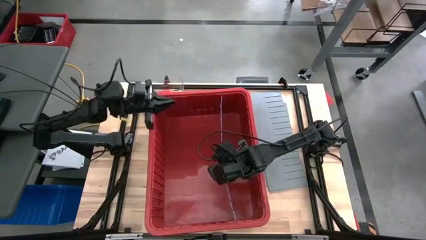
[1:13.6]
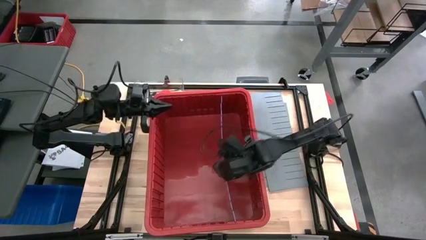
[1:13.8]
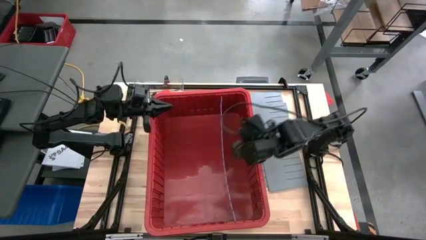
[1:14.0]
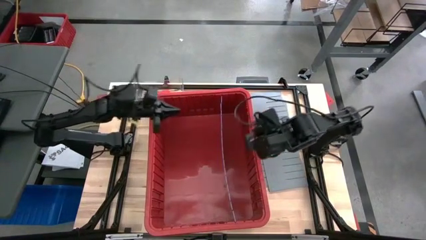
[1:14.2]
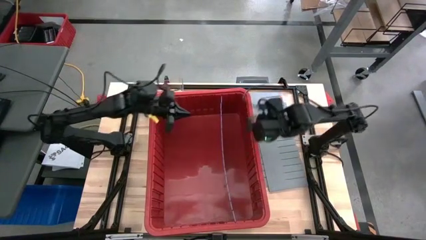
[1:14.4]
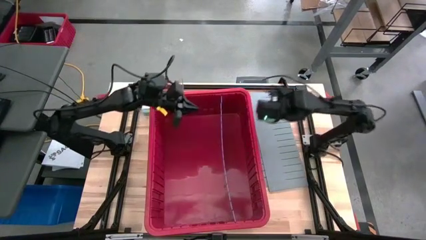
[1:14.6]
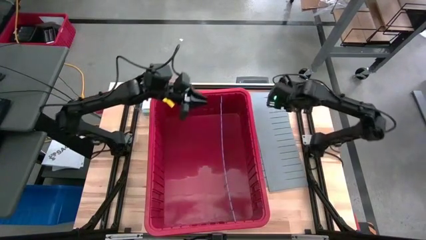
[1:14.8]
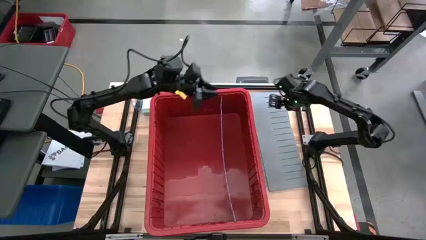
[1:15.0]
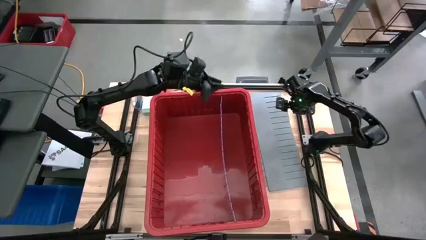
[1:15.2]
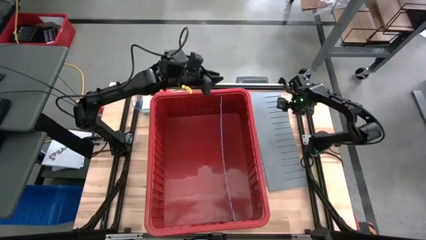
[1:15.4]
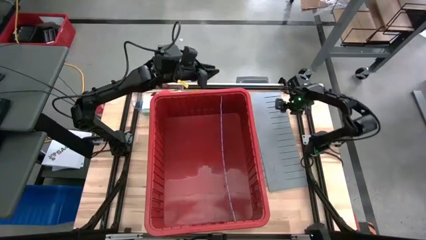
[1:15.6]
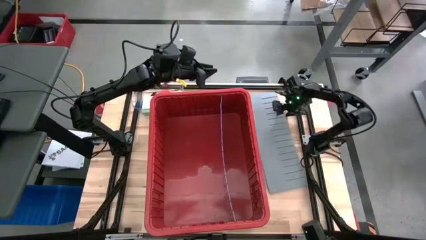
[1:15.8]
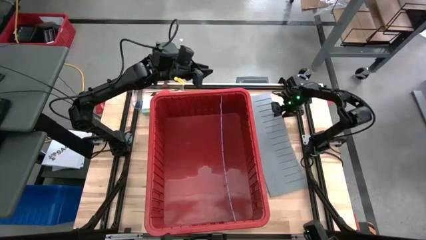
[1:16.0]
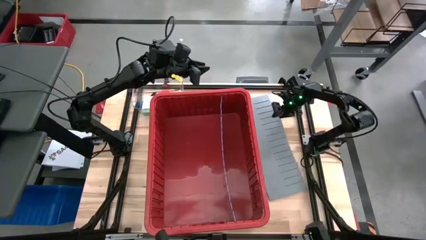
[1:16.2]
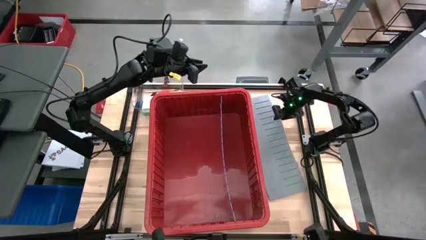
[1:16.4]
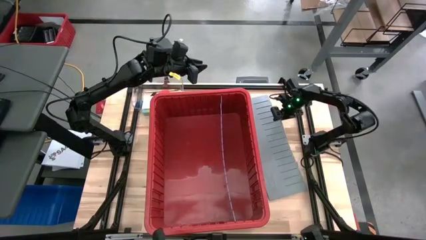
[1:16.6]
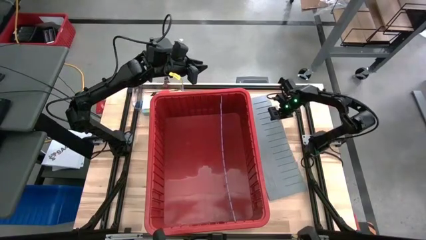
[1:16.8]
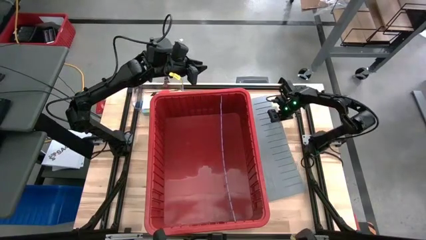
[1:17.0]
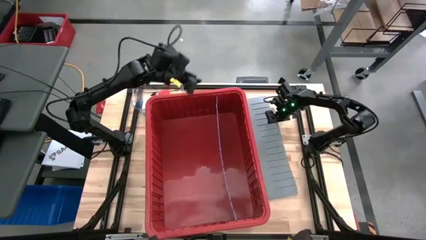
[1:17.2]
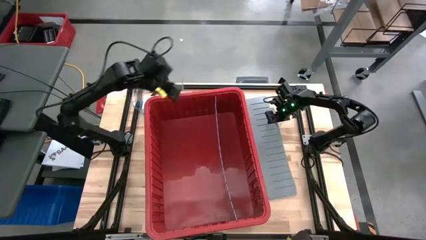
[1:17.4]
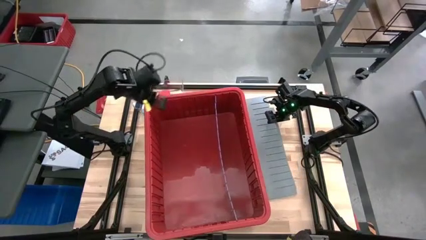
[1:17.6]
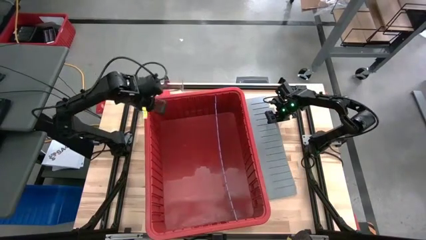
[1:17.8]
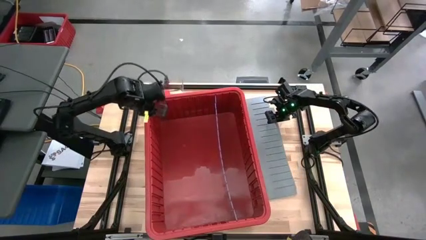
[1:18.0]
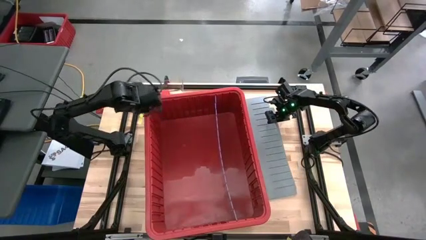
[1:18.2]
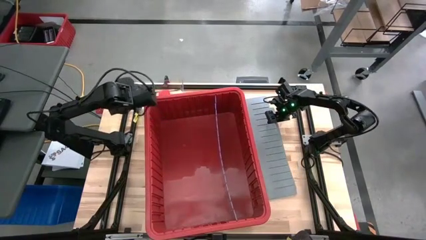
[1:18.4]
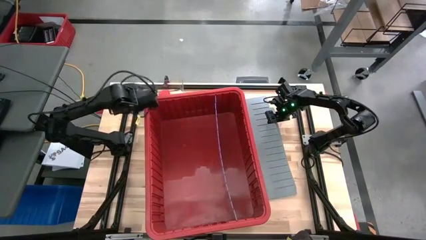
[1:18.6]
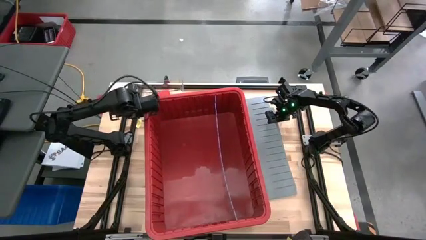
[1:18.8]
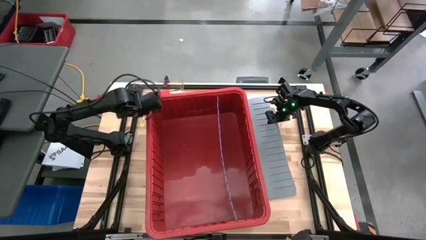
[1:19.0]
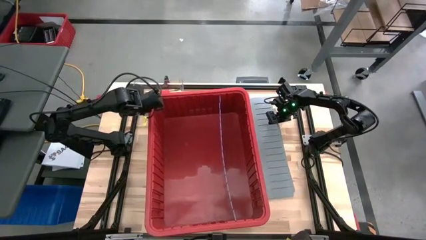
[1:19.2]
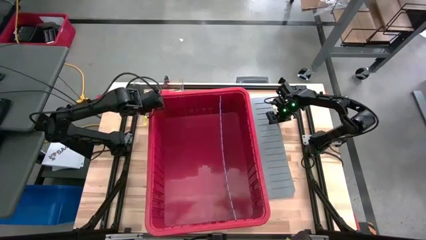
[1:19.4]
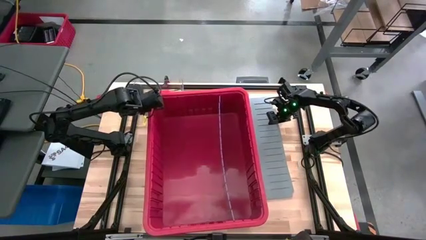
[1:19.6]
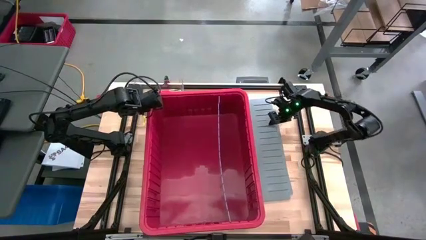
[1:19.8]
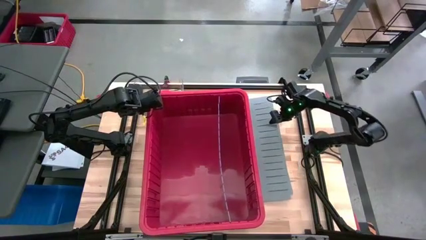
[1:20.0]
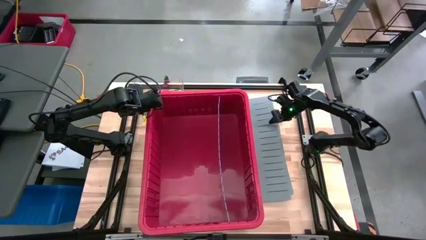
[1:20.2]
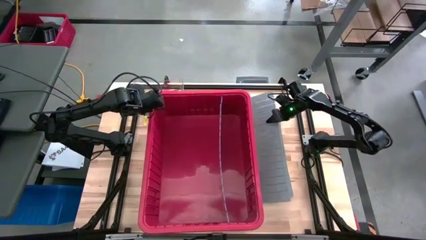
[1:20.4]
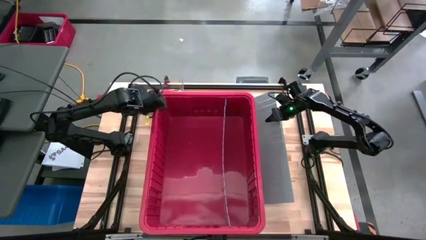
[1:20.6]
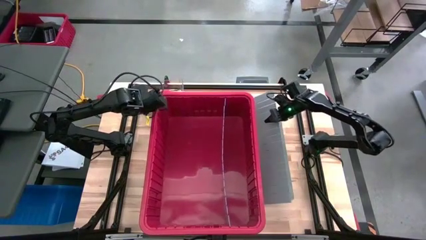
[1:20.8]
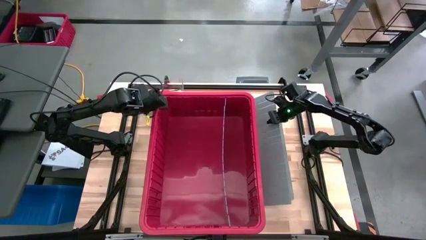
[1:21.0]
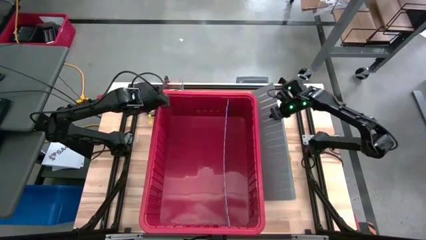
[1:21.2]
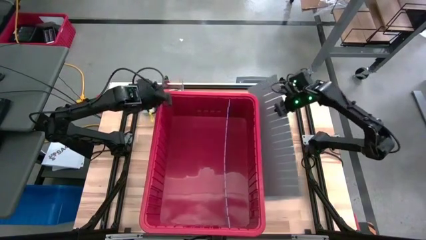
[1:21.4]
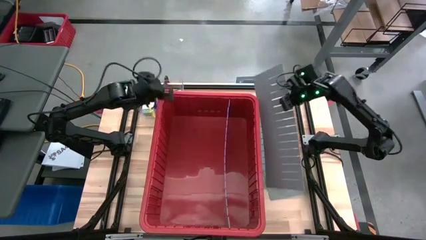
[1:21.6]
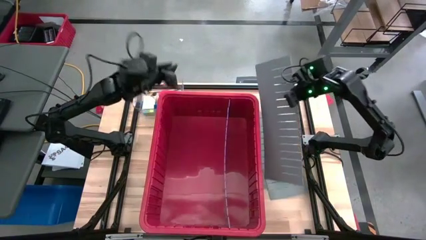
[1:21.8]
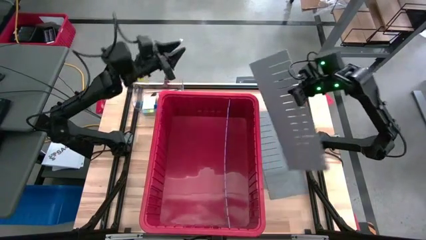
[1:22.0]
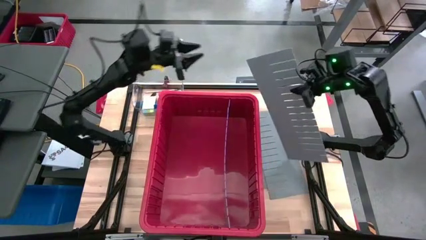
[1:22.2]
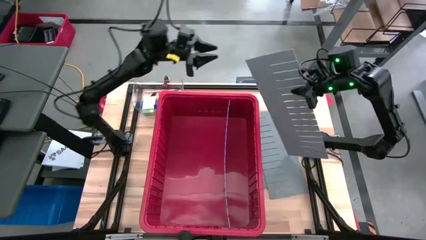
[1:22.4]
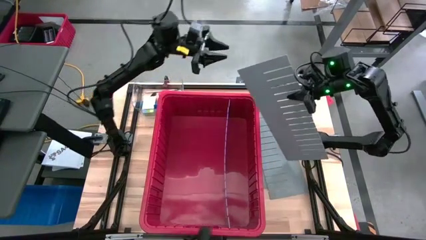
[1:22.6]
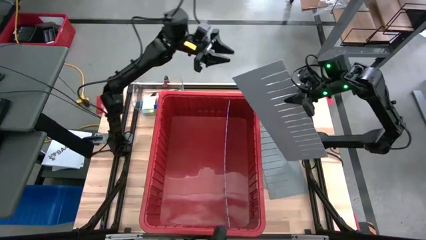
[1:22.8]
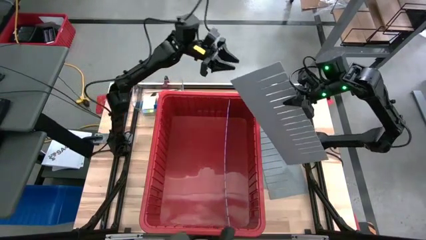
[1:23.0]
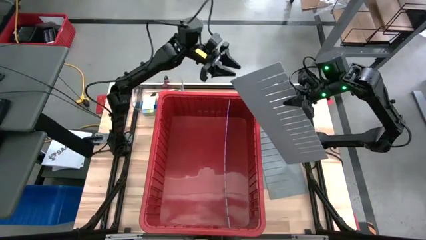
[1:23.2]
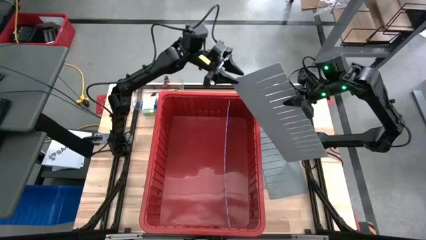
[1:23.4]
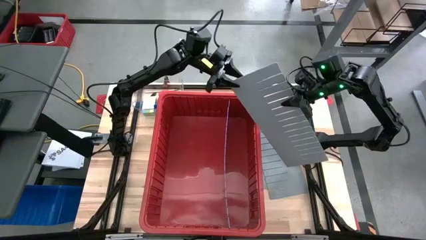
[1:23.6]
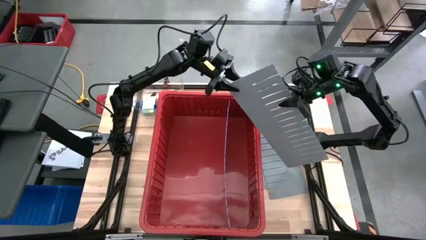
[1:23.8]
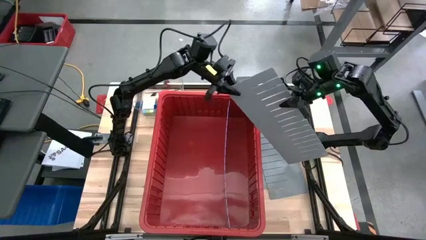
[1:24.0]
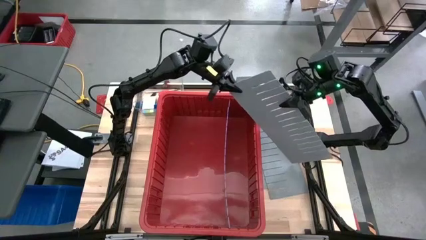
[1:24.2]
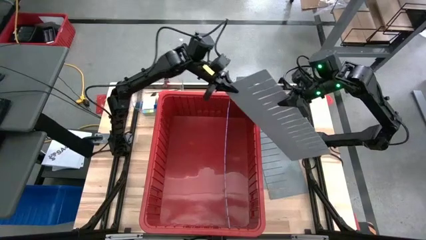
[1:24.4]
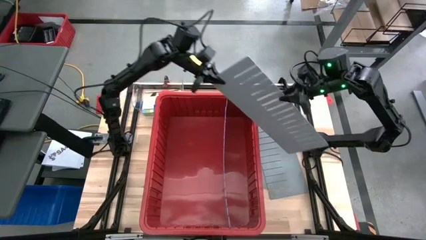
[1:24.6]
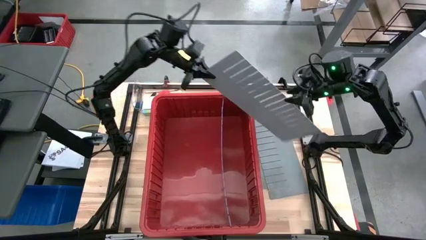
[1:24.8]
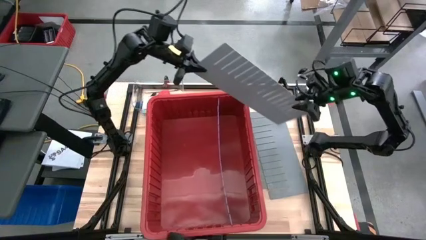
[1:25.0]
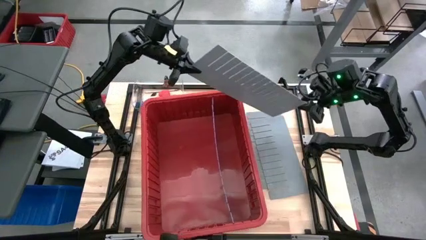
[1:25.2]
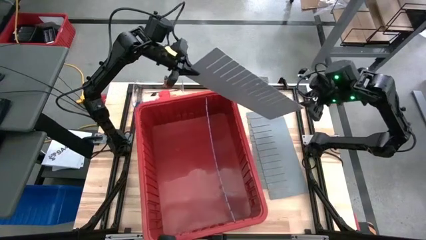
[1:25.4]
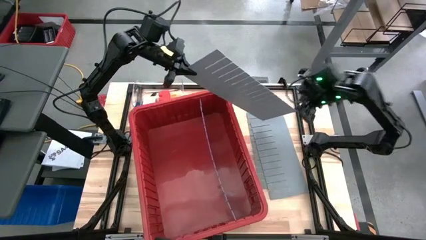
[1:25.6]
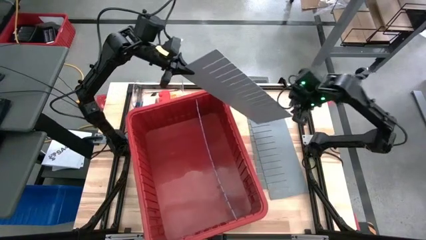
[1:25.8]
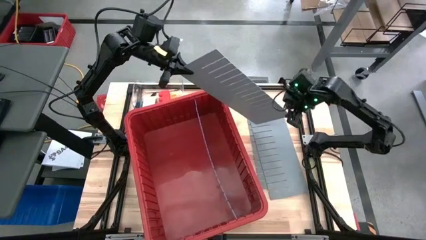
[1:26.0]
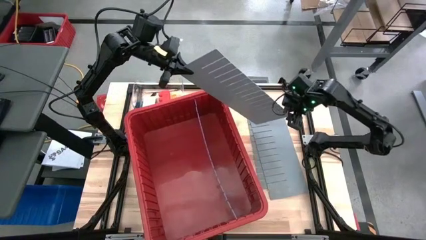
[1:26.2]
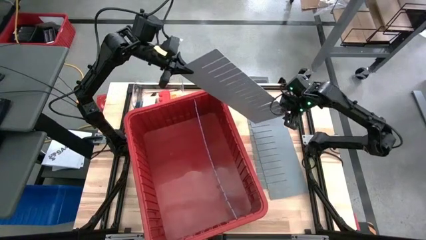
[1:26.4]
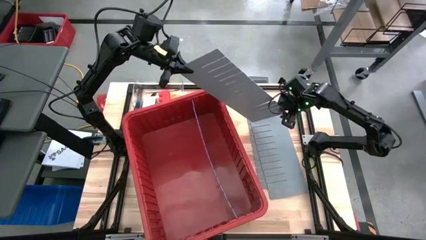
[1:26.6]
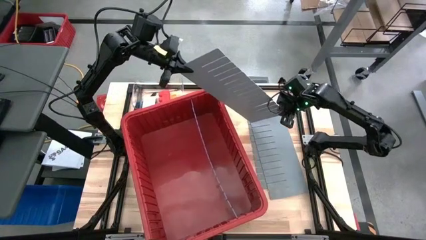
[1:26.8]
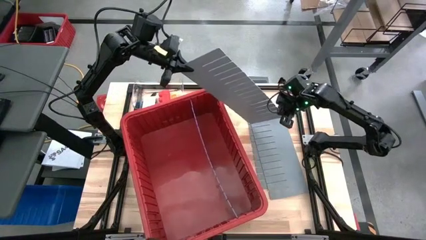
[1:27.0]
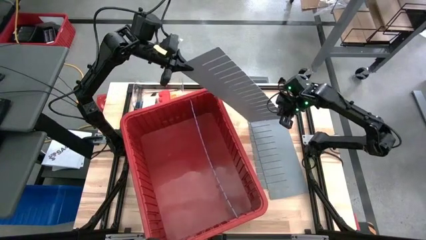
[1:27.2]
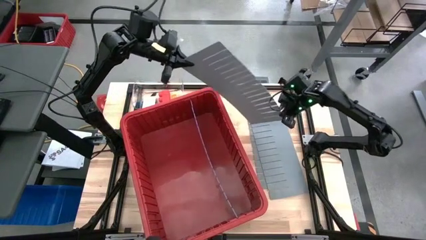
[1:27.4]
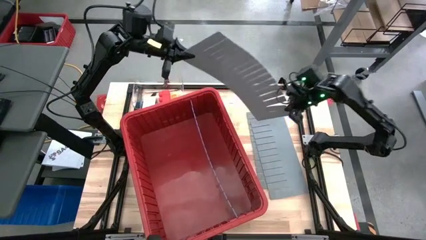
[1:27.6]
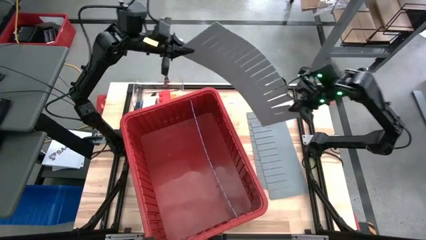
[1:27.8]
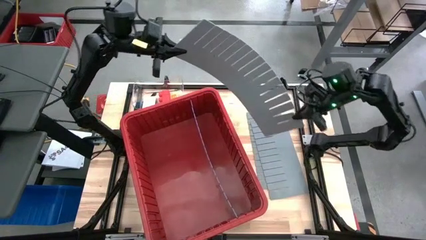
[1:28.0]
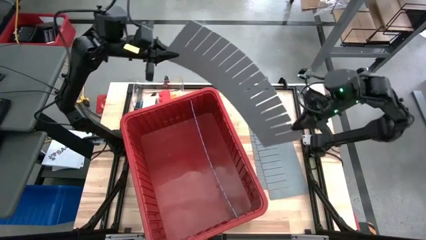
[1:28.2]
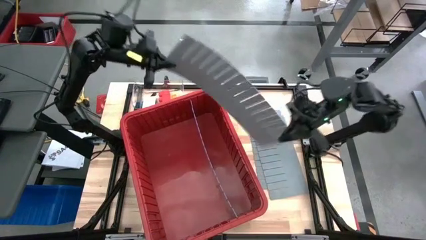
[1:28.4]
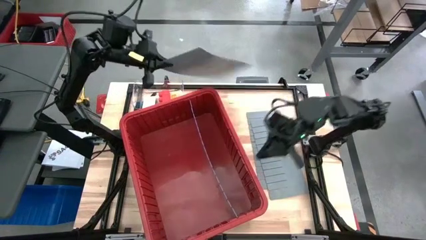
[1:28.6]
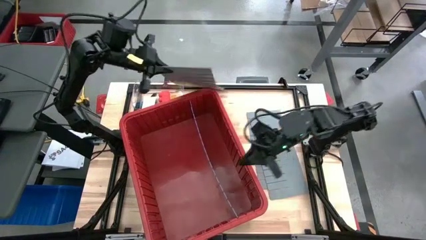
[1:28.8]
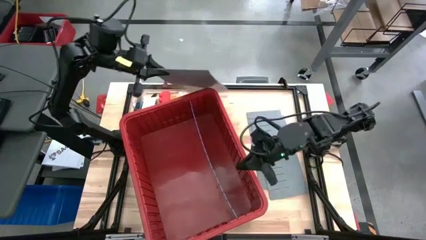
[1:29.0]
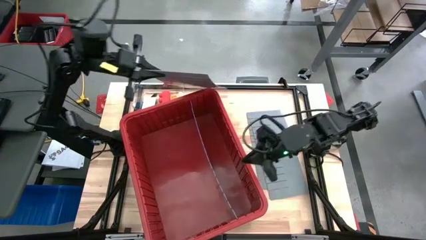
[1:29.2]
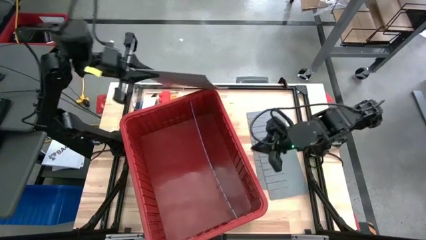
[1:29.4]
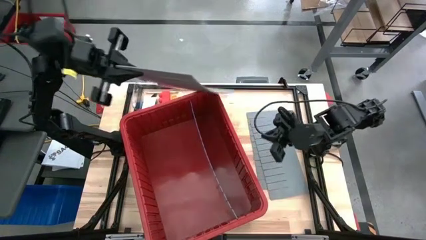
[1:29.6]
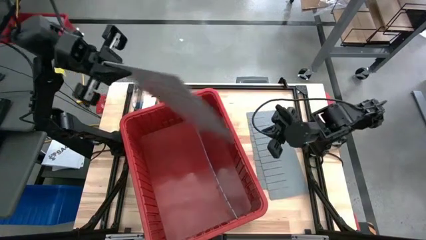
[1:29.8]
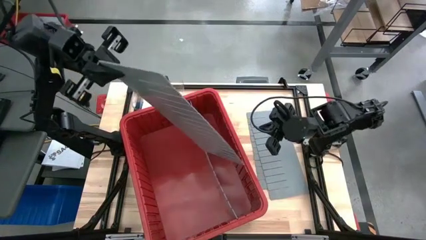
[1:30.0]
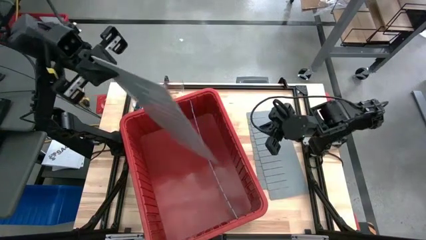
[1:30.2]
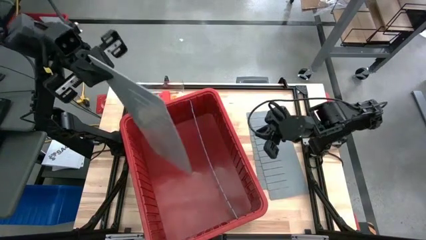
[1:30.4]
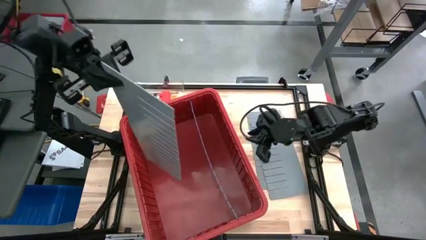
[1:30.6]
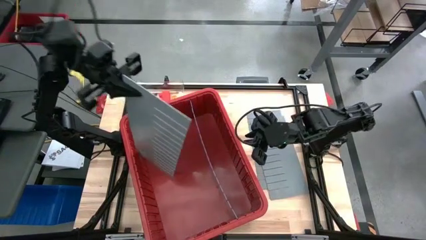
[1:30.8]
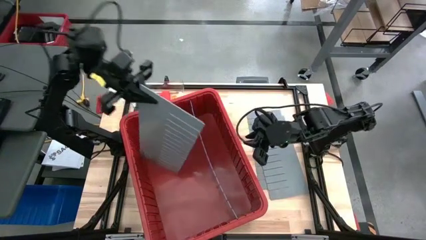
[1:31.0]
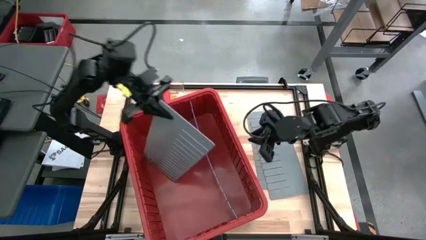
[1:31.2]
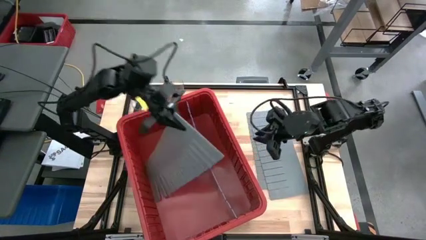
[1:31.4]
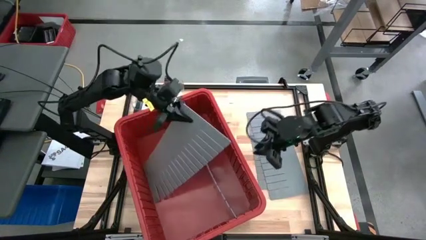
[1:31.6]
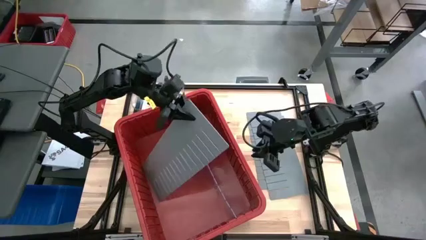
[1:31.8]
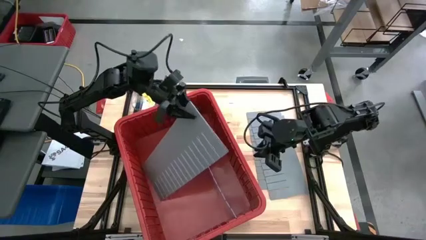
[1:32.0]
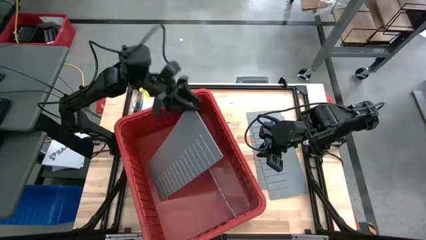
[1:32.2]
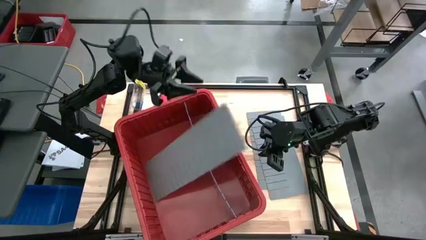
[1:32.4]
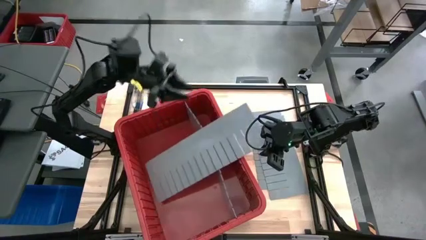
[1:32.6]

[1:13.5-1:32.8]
Task: Sort blocks
Assemble the bin divider into the red bin
